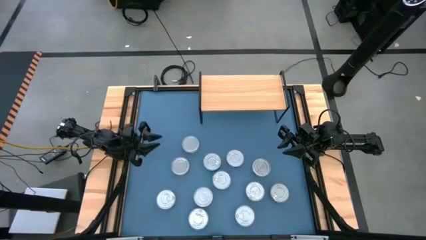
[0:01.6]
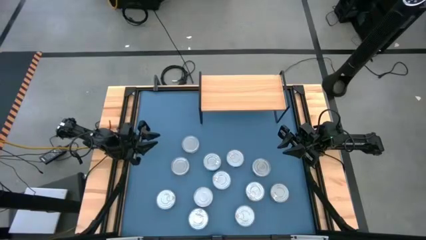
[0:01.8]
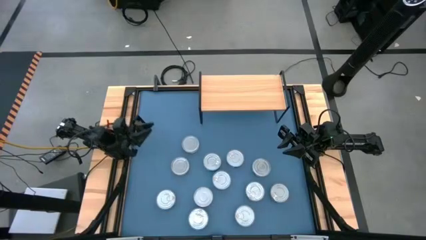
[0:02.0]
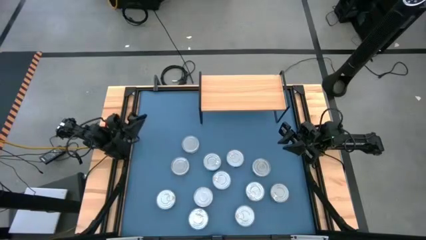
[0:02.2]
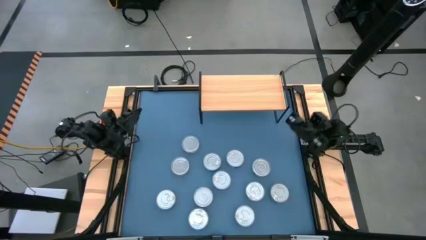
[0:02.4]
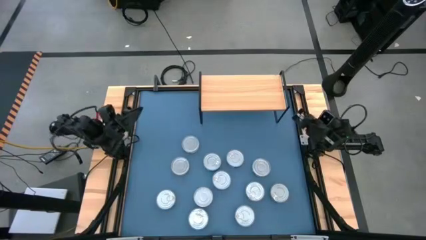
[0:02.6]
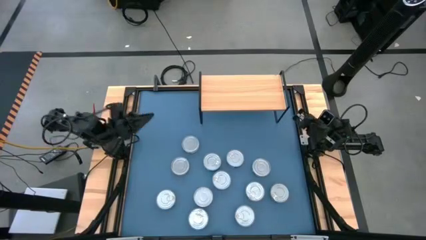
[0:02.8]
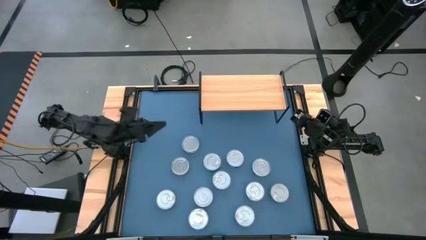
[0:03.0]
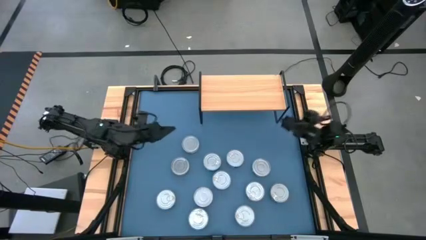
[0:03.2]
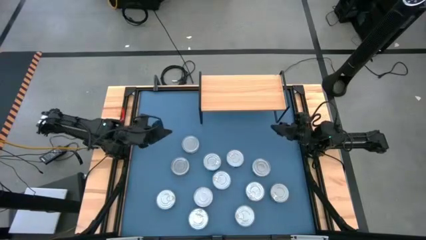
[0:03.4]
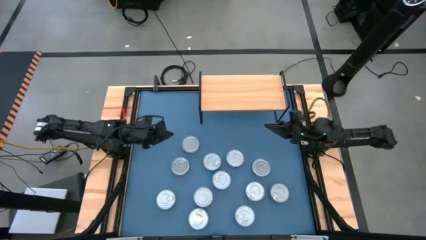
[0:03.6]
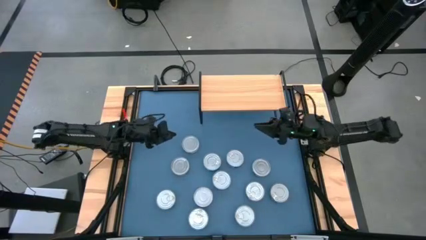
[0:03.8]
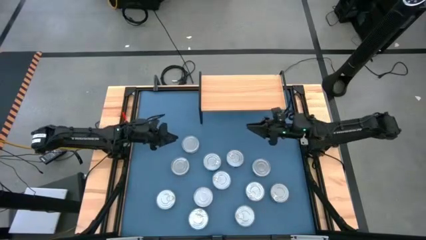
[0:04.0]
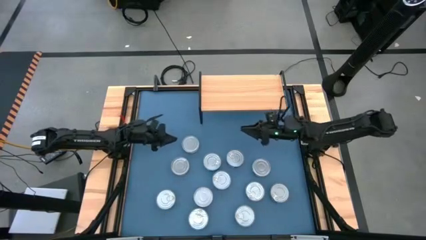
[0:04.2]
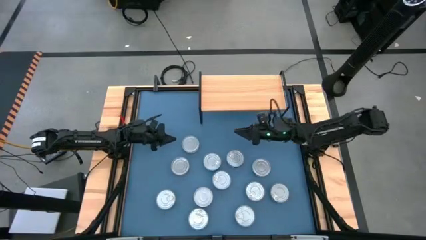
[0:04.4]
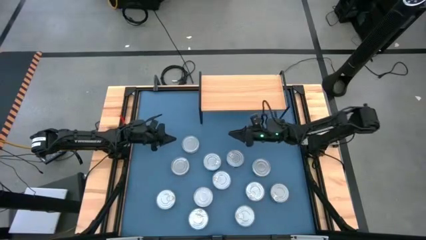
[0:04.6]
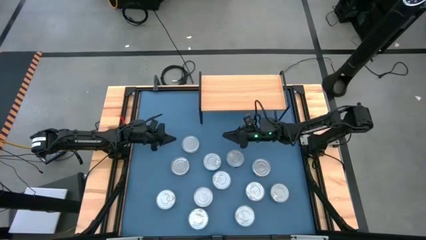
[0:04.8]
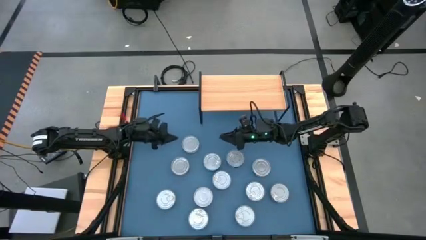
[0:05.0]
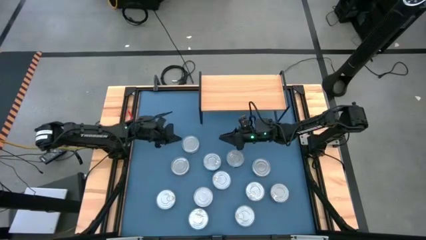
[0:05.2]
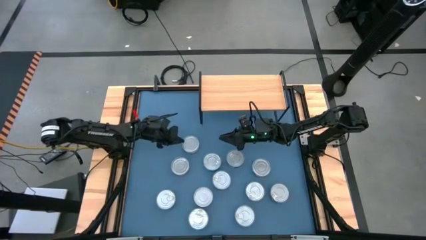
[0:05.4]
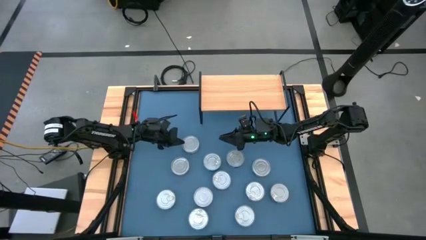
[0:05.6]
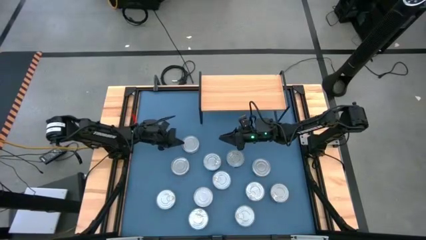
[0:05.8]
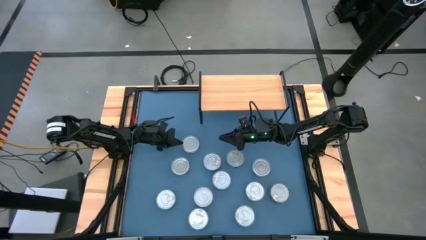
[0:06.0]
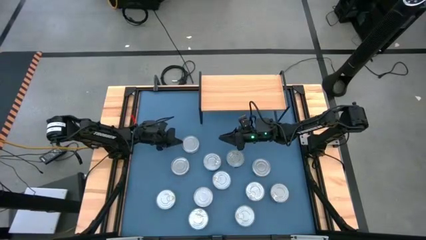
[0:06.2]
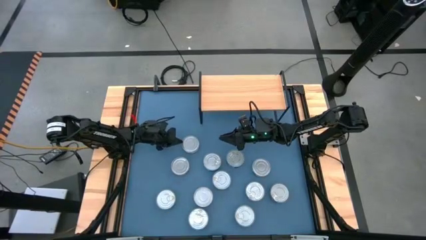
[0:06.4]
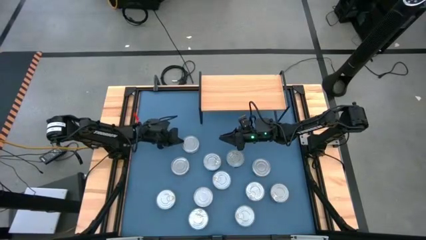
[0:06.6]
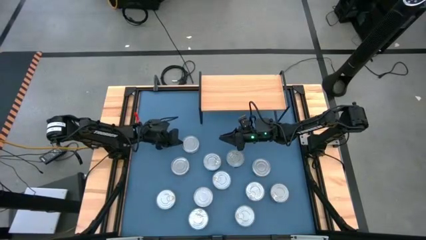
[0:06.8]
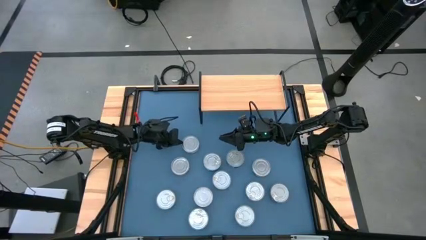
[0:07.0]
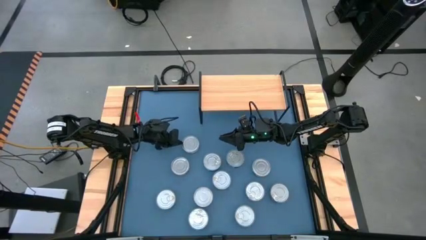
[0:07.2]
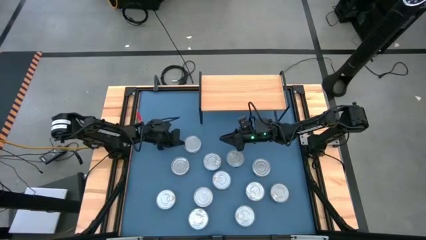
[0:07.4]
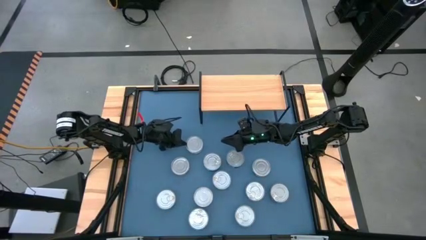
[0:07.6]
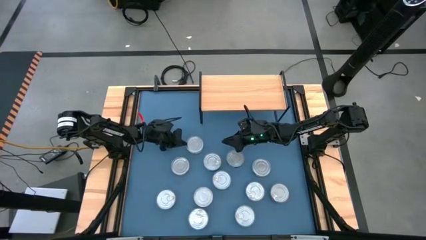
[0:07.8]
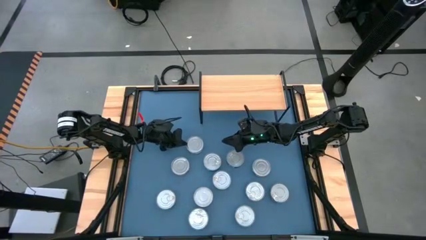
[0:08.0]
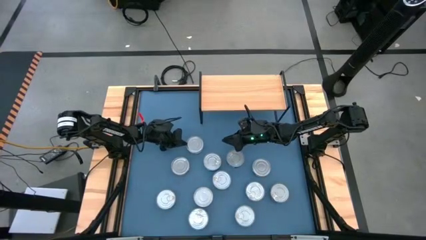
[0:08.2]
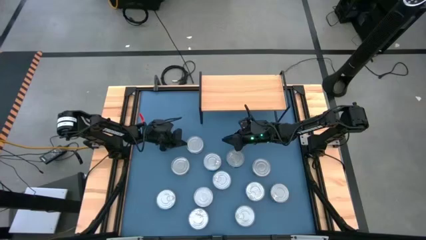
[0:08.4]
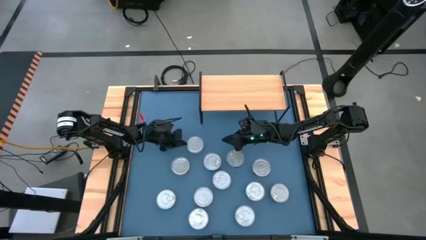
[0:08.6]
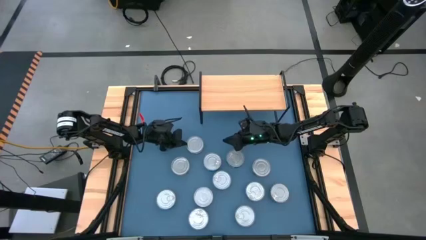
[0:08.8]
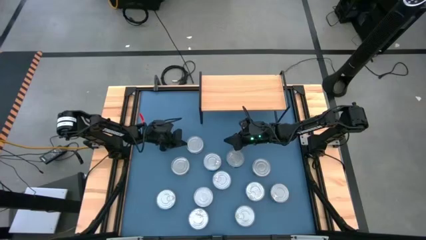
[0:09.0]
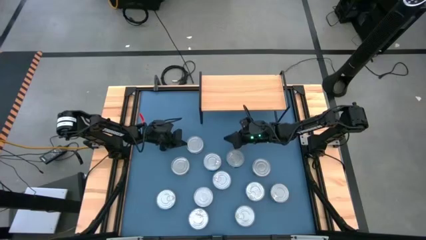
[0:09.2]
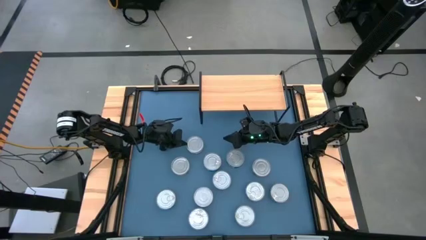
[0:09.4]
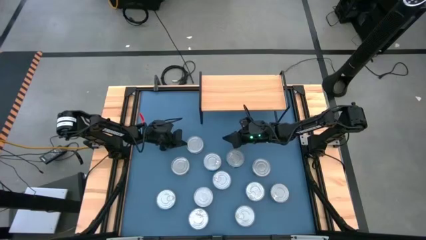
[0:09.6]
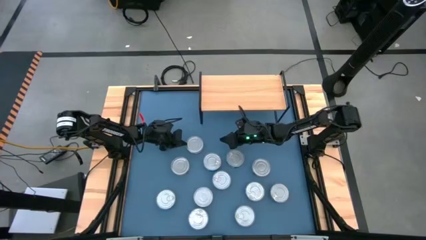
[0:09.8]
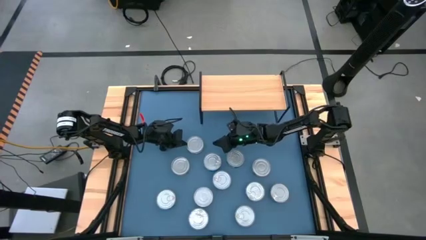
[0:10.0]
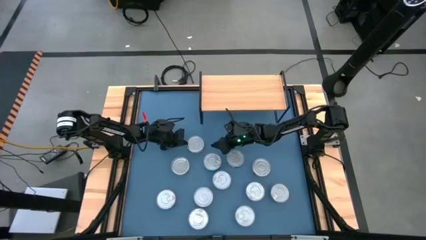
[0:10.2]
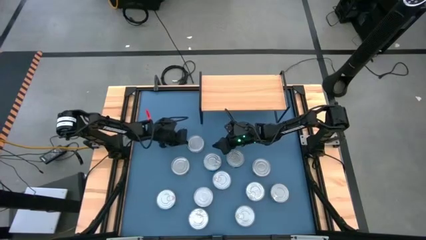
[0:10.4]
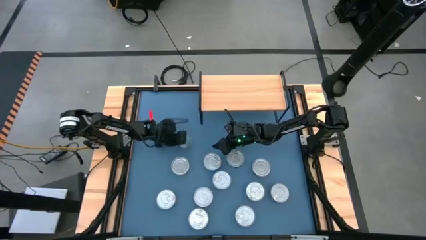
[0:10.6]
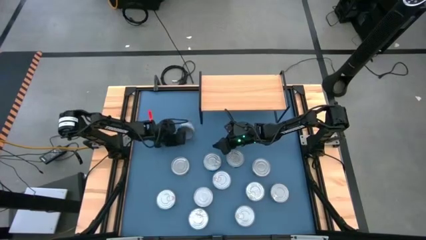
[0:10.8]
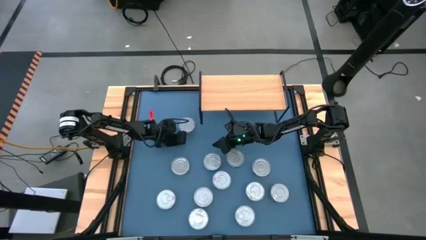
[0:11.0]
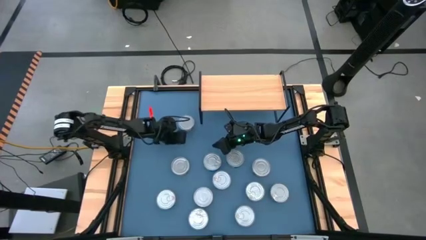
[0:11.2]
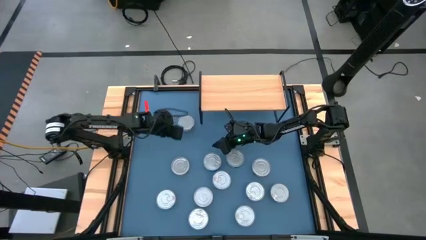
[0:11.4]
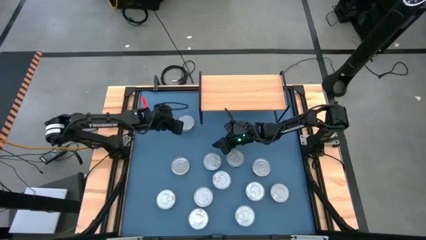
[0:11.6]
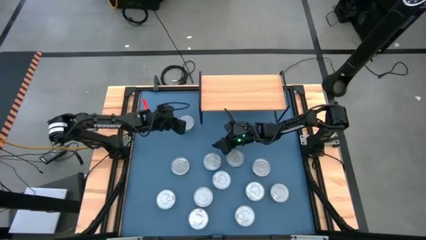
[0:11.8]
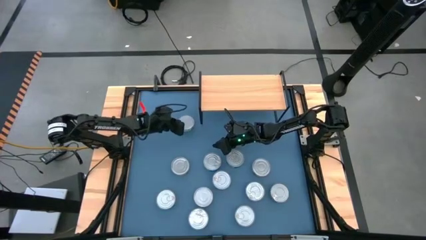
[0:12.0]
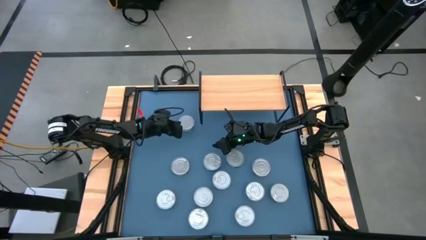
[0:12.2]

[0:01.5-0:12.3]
Task: Stack canned seafood by type on shelf
Put the green tuna on the shelf
